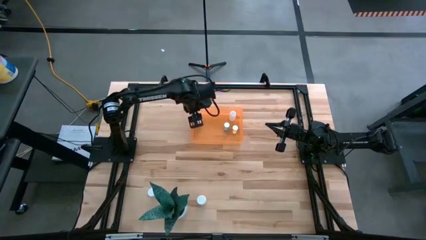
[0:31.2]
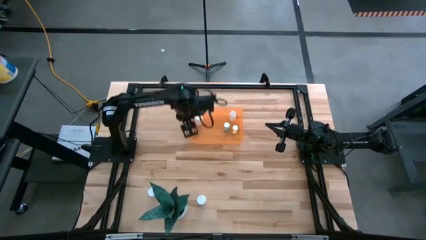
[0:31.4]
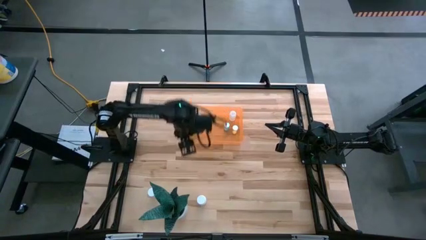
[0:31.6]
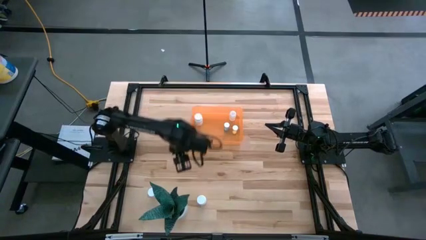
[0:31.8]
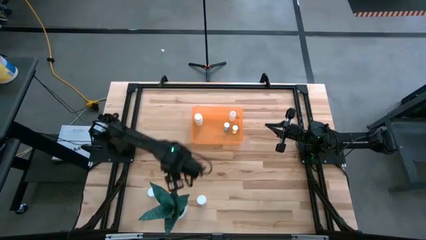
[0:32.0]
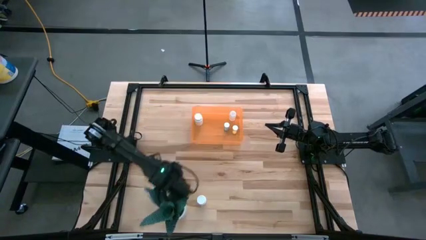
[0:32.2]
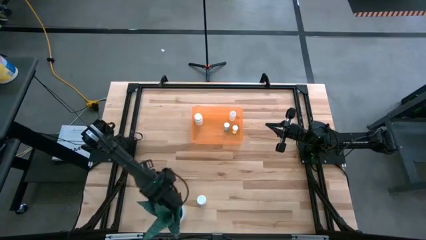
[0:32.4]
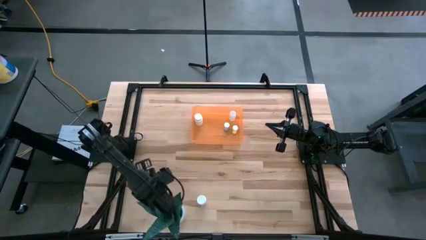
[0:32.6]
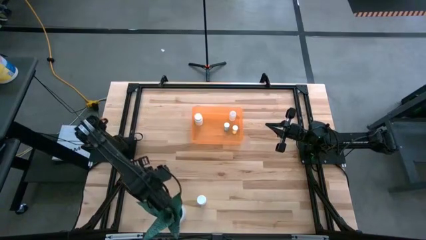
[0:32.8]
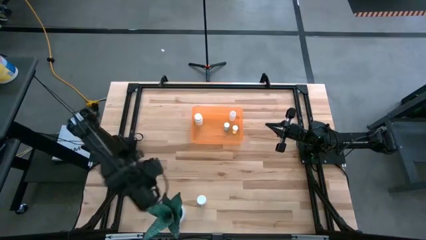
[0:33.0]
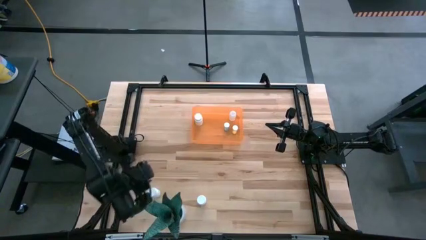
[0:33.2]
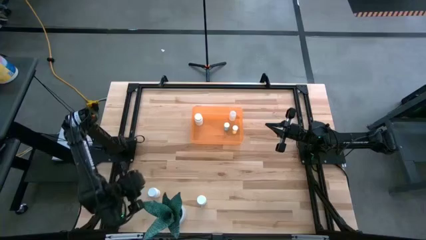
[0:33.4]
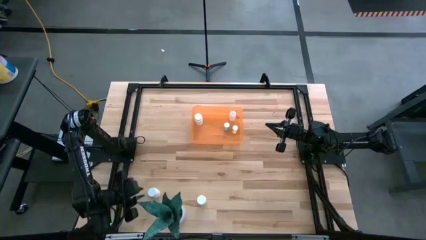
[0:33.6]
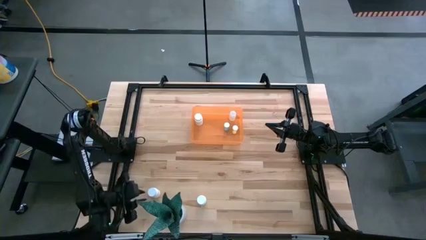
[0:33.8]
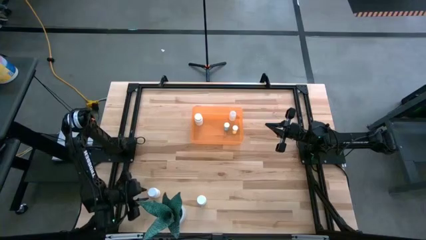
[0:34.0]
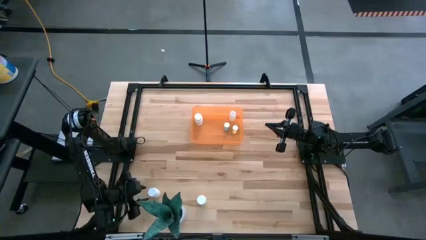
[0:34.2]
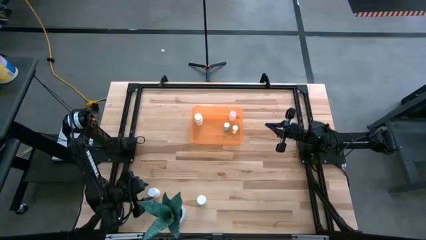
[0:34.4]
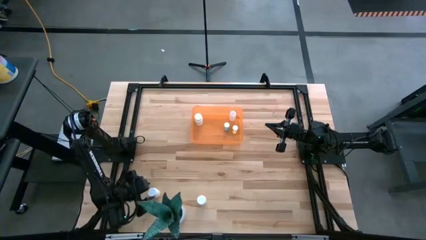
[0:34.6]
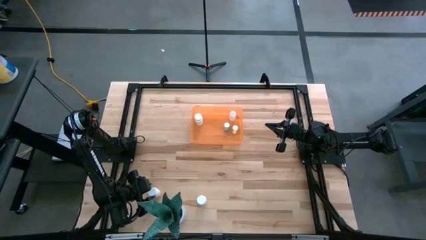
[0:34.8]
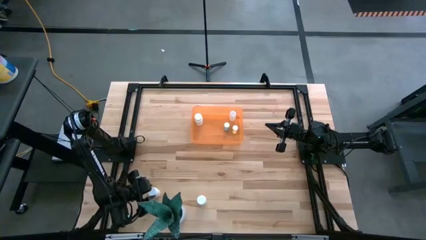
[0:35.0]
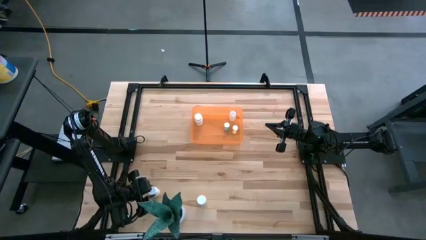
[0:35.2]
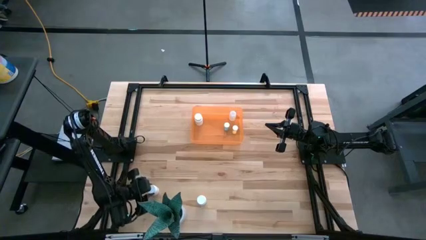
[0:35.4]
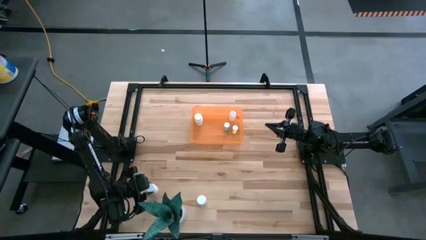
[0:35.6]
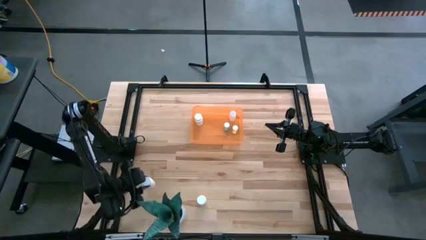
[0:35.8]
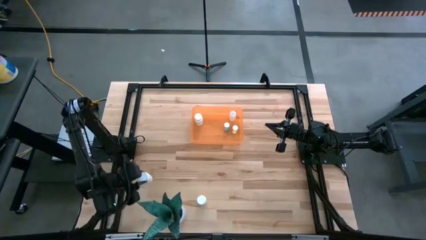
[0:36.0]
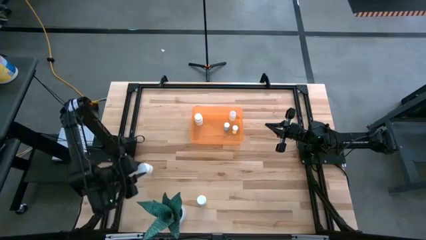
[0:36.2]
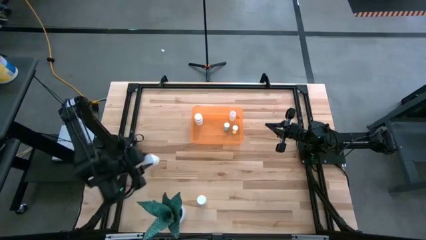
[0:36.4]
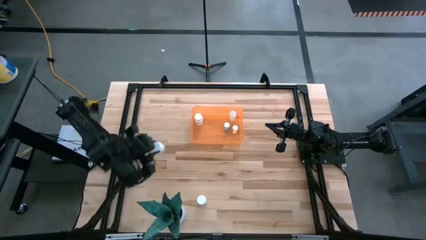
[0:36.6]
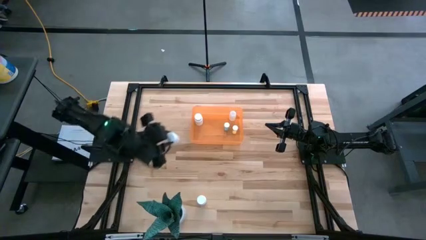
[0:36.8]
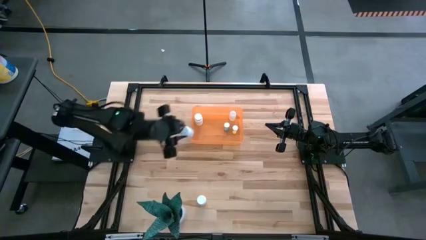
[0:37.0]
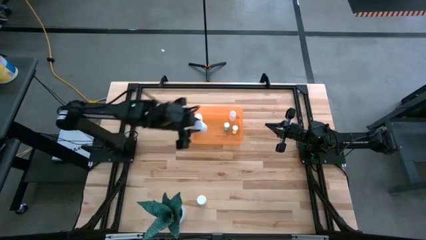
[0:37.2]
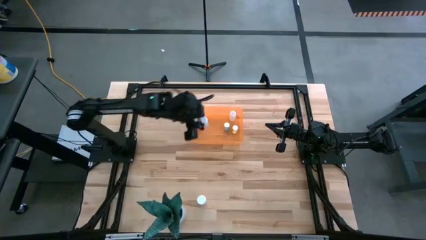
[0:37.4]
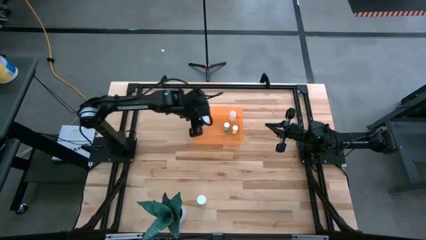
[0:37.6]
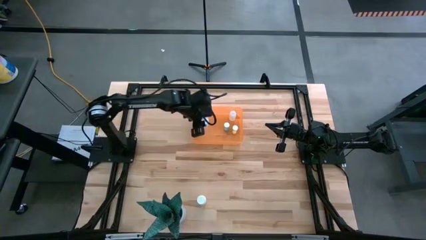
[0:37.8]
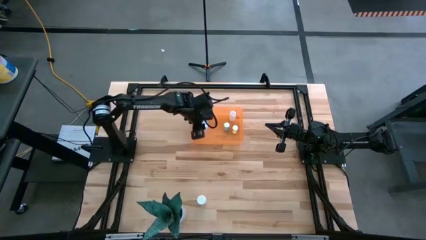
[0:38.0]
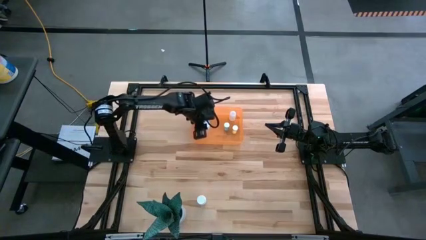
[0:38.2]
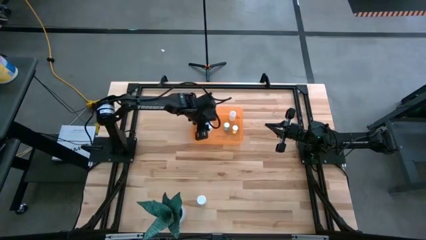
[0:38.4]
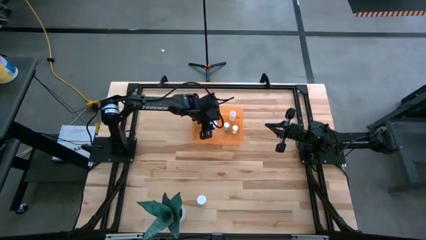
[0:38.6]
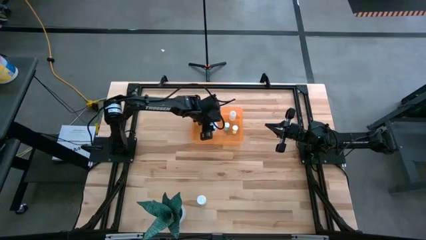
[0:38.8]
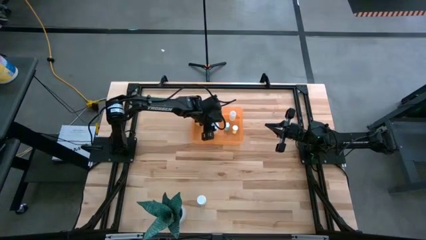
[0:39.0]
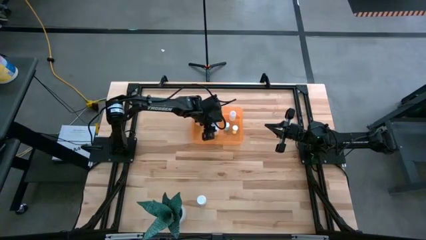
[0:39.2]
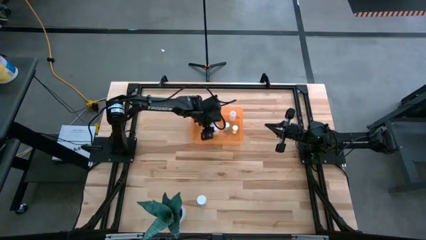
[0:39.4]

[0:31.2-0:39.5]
Task: Pick and place pill bottles into a basket
Put the left white pill bottle in the orange bin

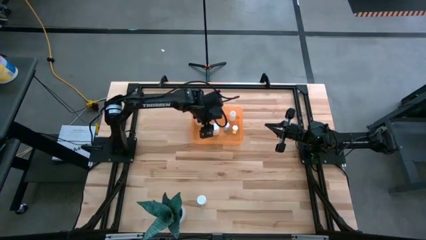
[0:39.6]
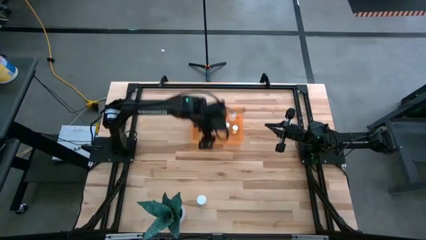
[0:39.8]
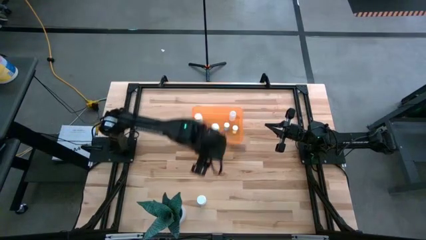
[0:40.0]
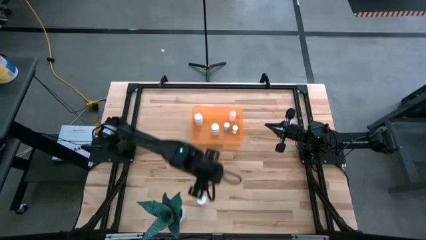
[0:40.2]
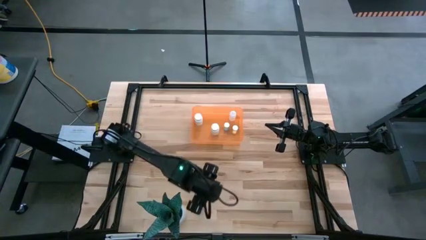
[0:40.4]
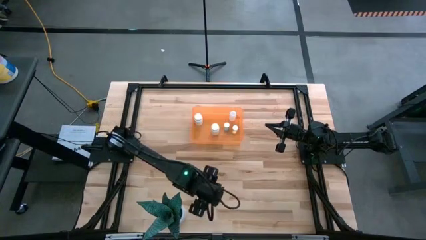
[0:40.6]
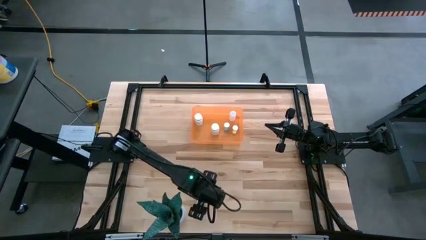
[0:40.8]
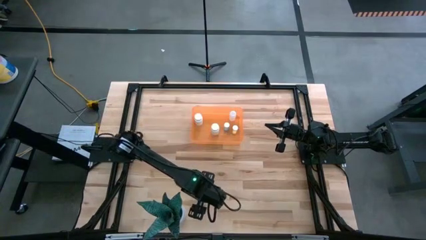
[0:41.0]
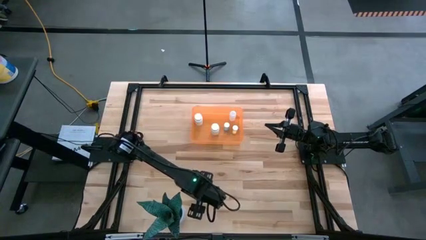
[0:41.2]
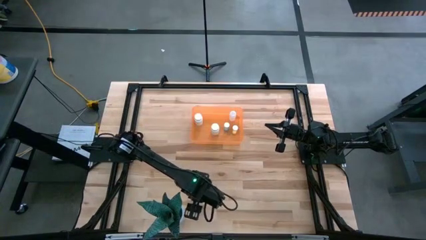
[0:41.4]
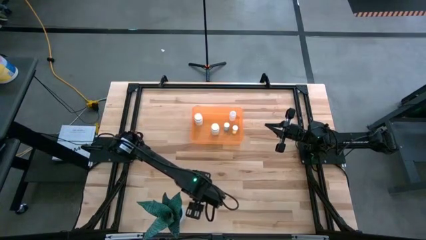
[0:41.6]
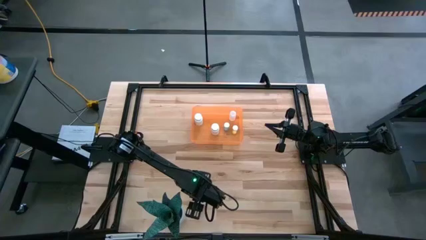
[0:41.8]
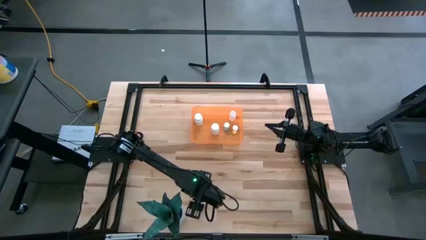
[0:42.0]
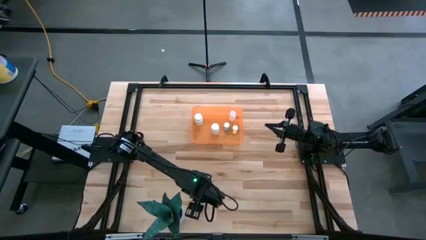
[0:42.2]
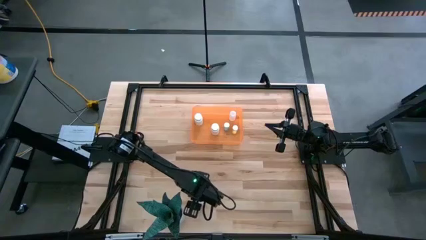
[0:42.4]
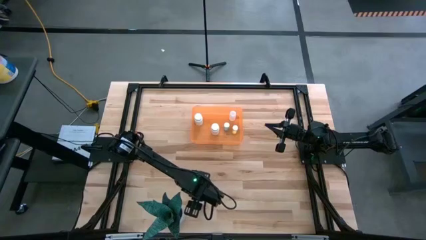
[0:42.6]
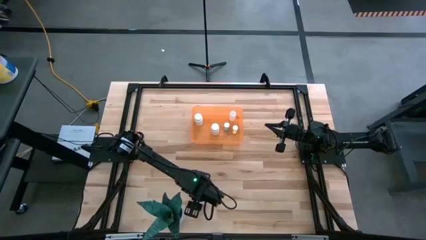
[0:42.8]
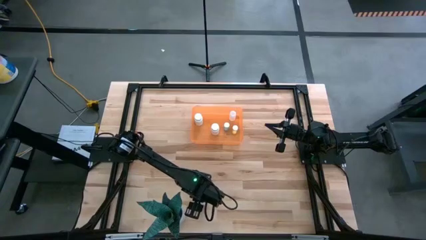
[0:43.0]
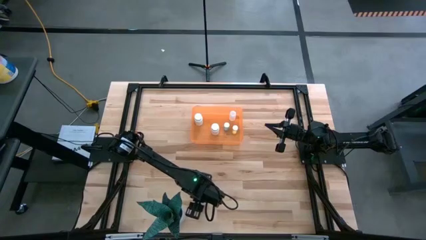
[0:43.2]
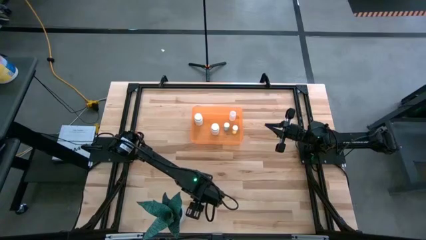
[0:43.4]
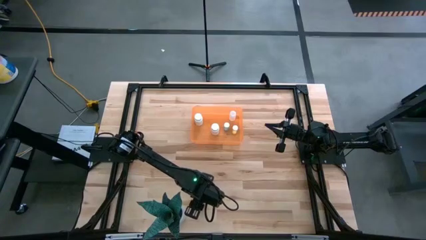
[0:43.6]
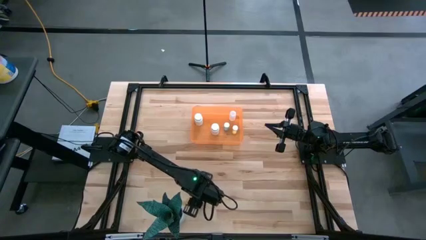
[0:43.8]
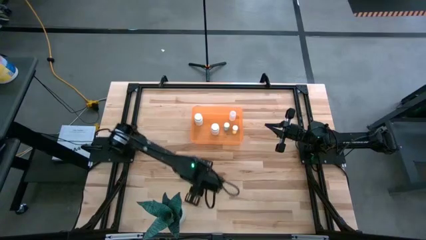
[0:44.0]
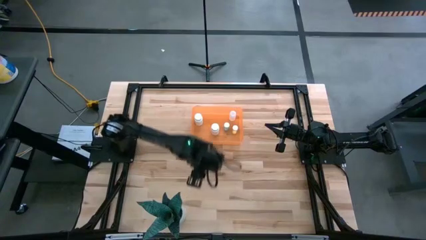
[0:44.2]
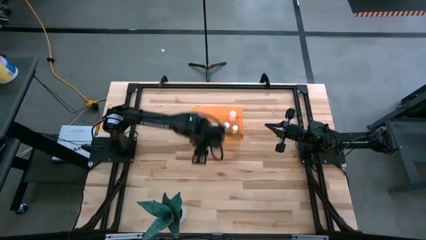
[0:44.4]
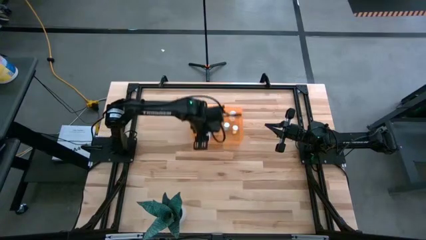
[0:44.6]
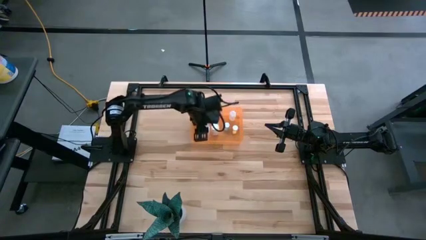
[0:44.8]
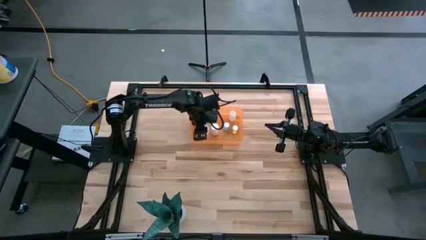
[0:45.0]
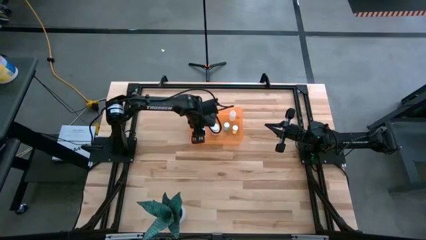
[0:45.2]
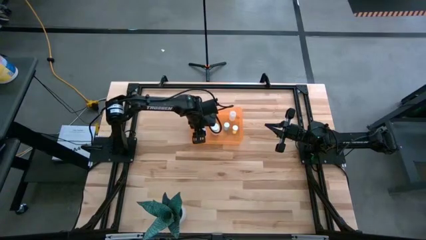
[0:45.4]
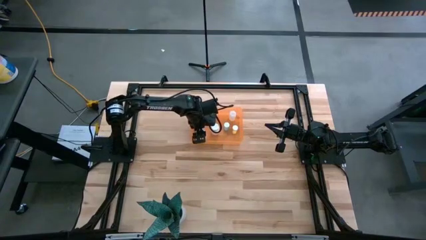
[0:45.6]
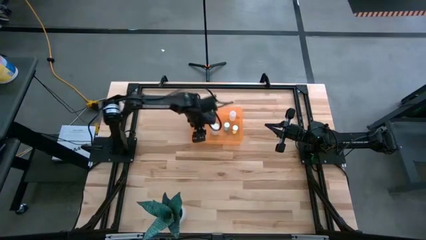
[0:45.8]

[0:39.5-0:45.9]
Put the white pill bottle in the orange bin

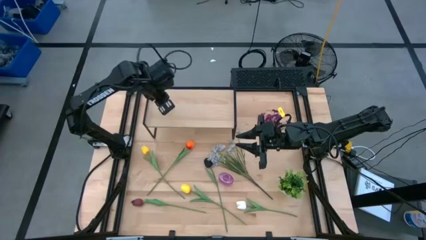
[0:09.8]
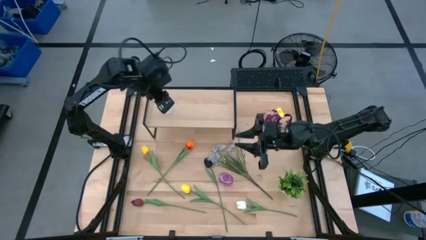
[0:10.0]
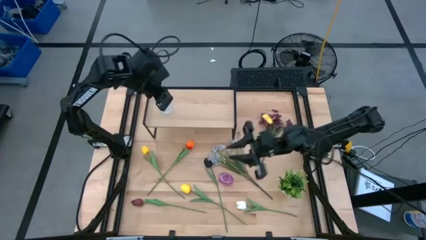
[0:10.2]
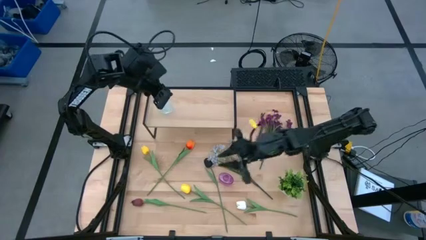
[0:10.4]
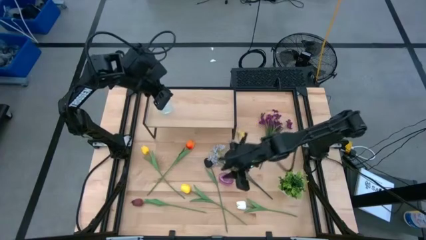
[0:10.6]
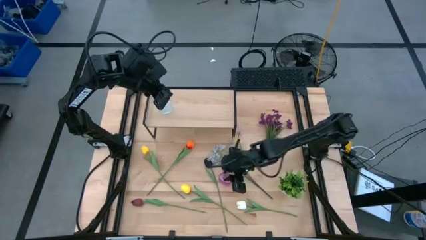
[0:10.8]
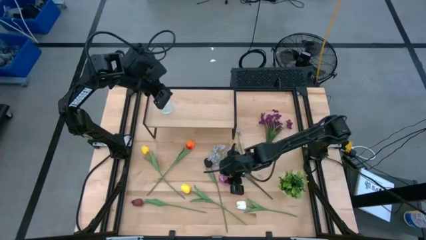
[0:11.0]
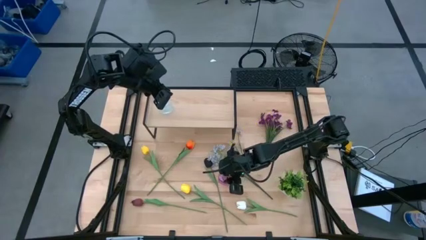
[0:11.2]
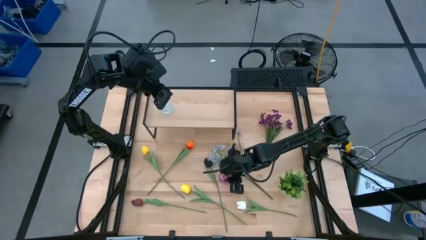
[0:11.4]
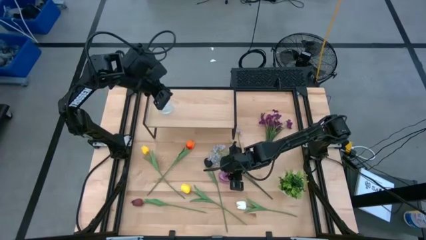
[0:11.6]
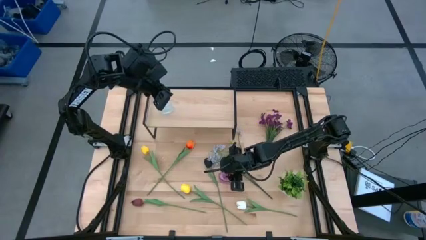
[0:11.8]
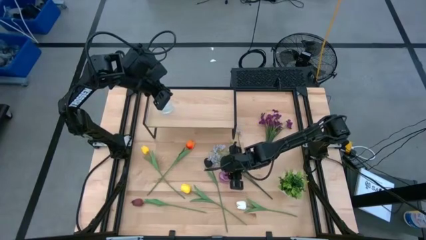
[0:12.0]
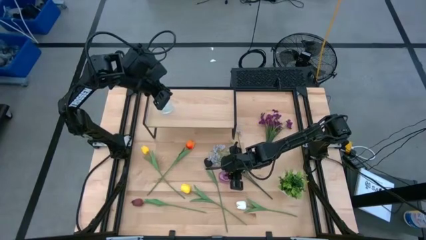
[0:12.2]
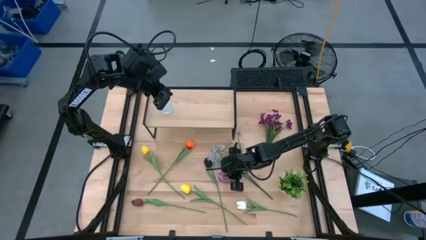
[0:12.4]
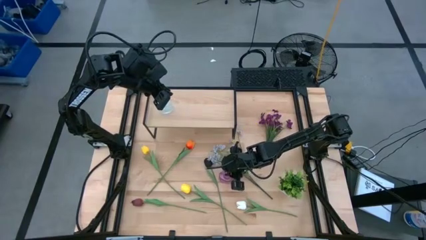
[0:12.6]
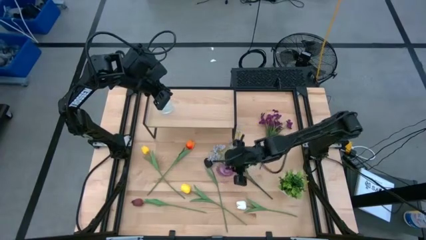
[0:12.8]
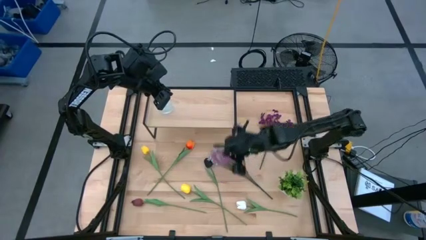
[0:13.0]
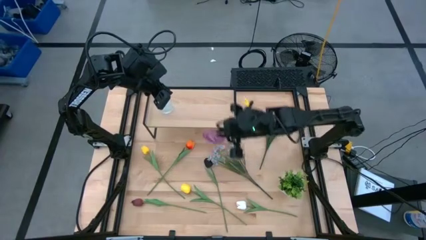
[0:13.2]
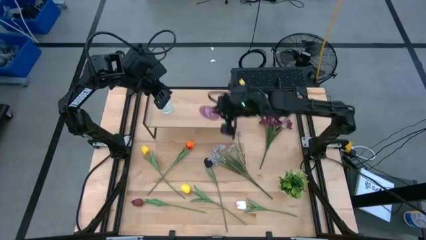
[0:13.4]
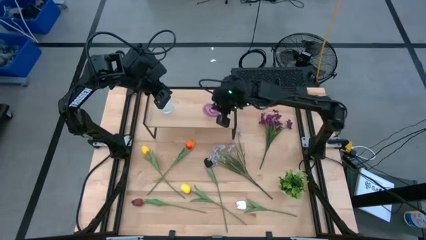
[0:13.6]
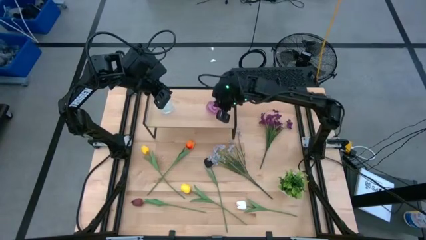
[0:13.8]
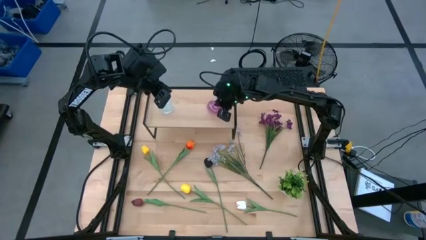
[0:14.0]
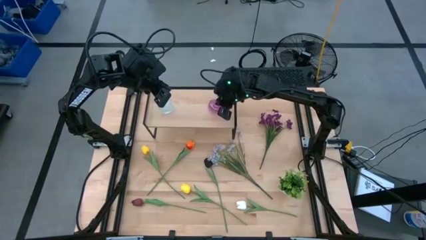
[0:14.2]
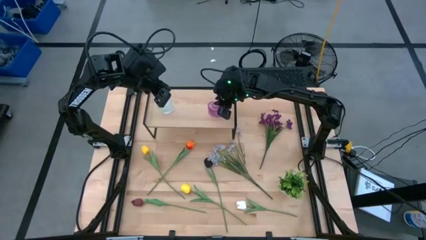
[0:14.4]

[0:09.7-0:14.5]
Task: Pick and place flowers into a vace then onto a shelf
Put the violet vase on the shelf
